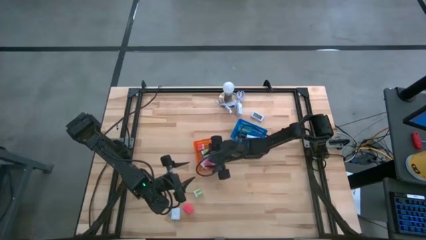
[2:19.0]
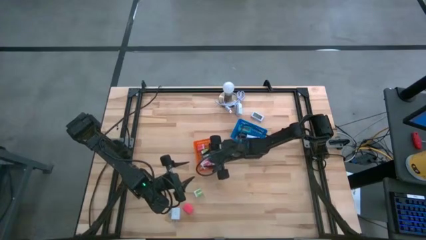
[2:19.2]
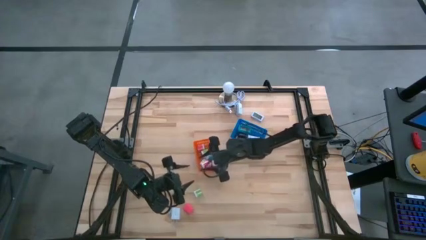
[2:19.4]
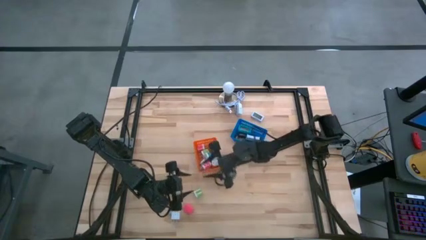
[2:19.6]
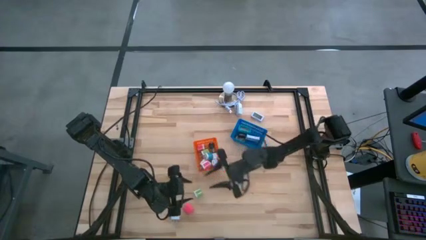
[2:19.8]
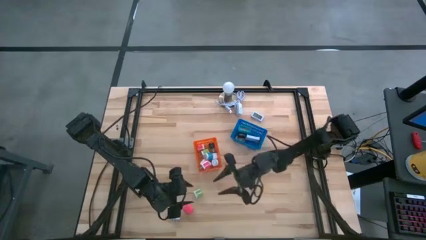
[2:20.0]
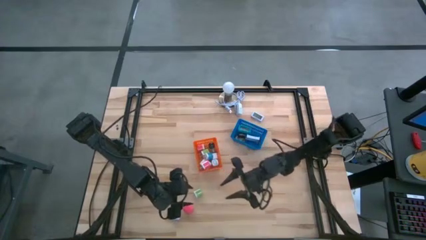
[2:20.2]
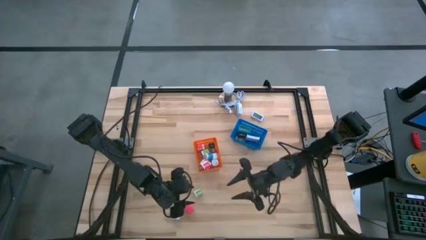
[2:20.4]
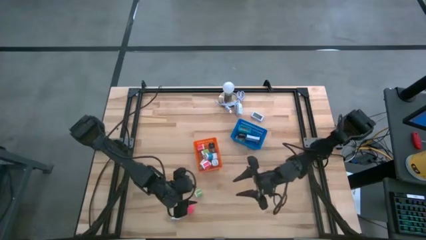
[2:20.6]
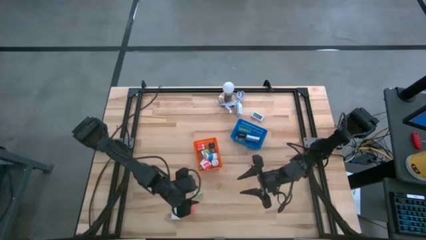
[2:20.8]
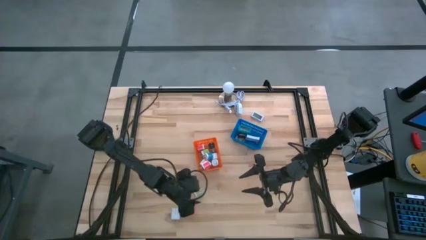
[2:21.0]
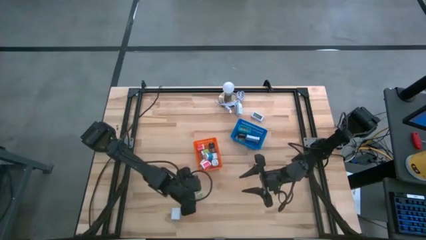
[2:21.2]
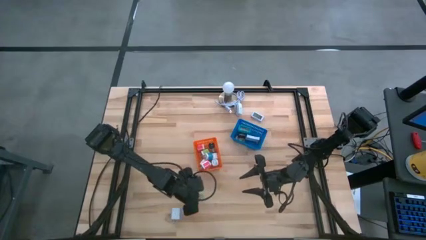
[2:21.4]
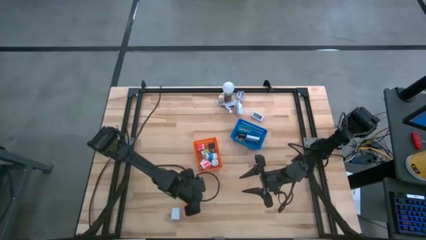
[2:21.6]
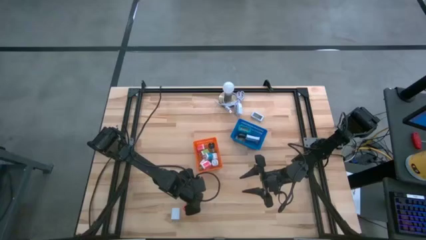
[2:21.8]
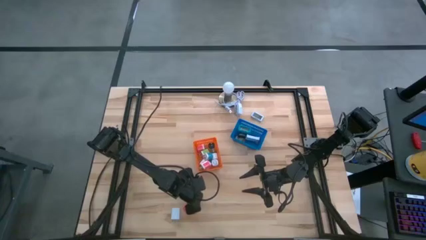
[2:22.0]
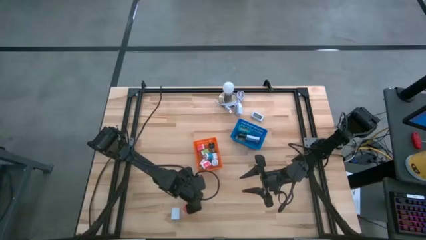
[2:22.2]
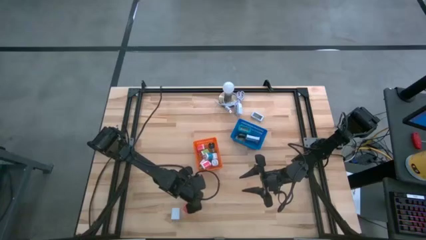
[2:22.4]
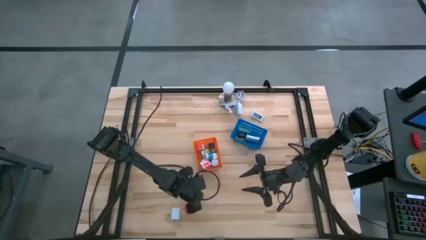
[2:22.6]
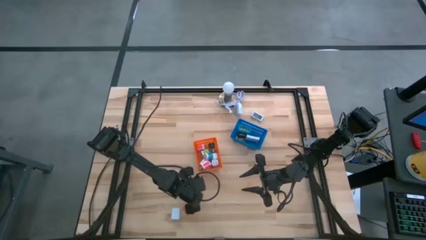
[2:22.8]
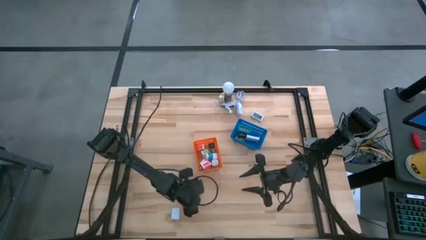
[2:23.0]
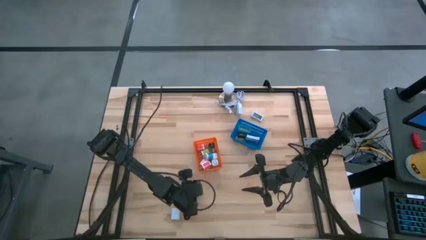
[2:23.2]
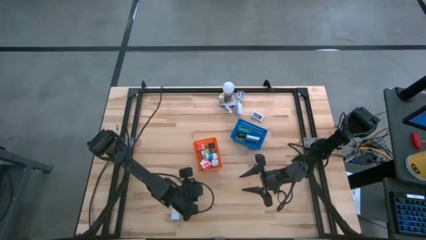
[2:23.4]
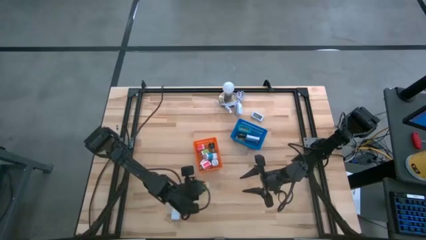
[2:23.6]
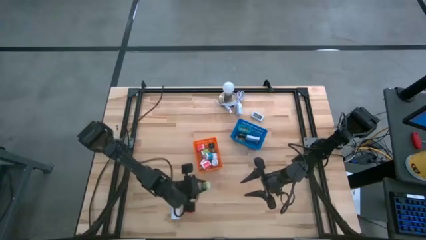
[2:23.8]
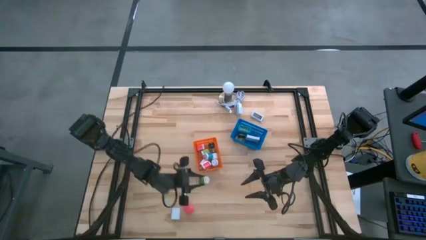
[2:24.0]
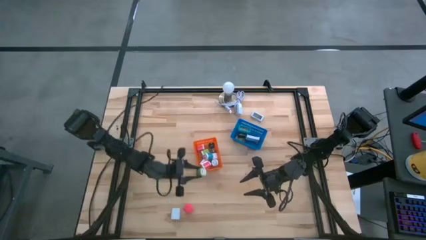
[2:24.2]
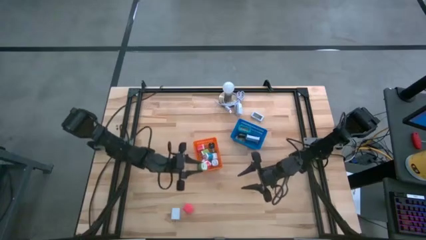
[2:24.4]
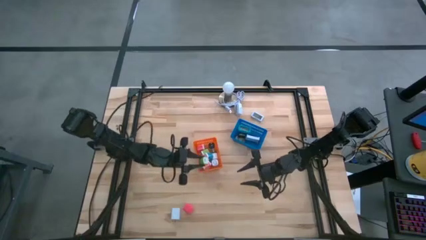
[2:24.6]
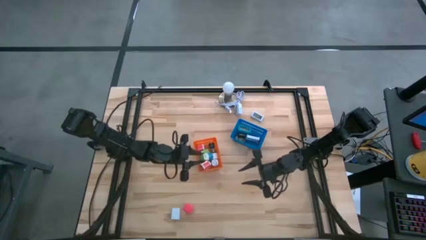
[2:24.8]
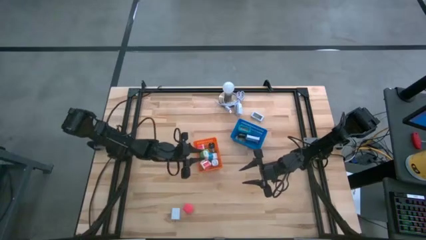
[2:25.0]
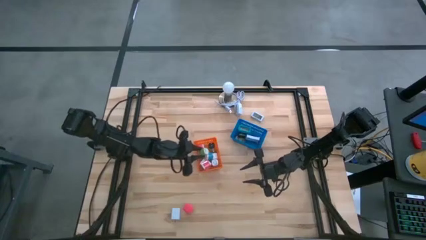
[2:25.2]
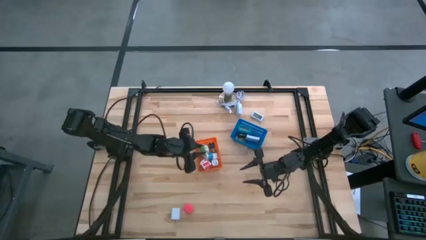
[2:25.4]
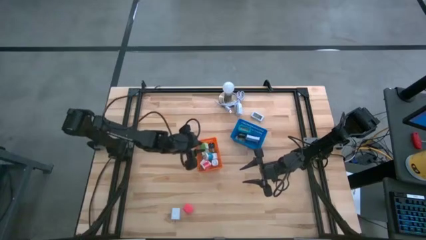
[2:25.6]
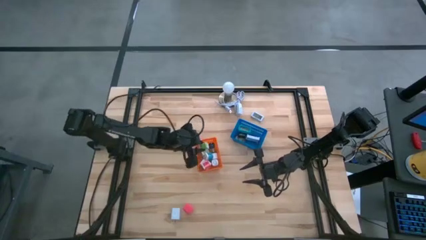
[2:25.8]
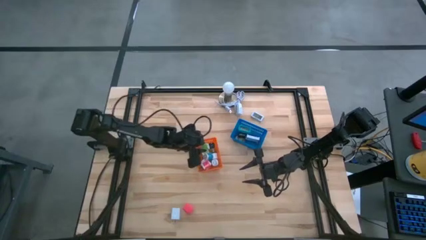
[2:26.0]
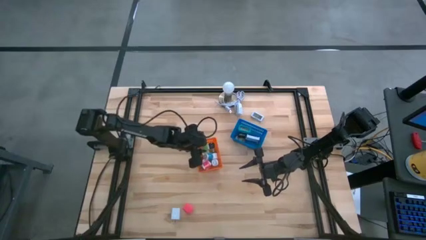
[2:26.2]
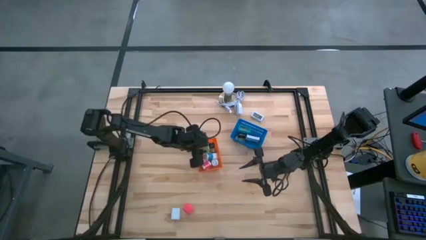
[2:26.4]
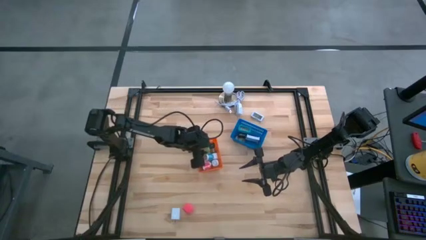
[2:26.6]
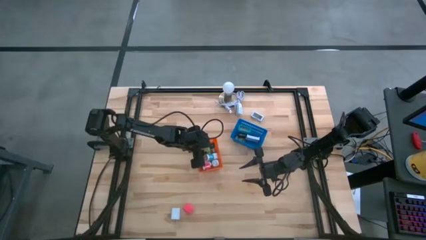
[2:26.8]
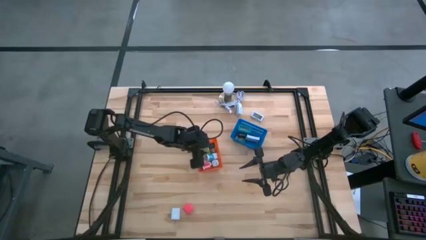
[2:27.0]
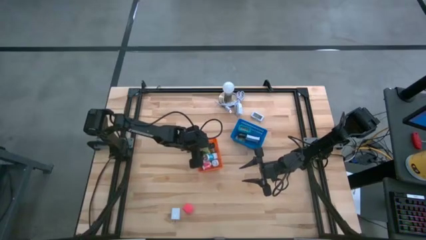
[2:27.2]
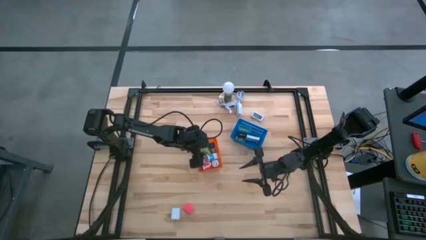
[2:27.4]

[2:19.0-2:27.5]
Task: Pick & Place Office items
Put the green charger adapter into the orange bin

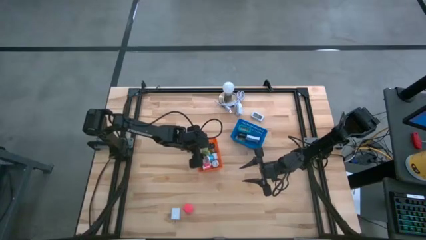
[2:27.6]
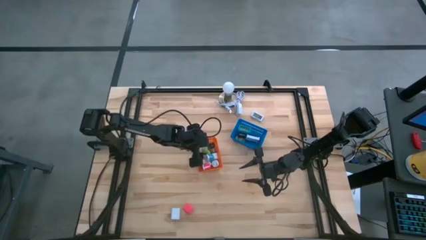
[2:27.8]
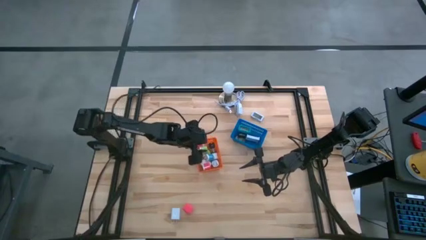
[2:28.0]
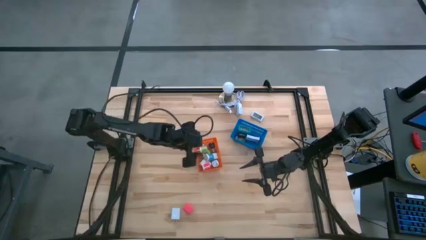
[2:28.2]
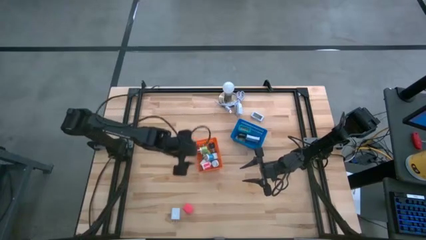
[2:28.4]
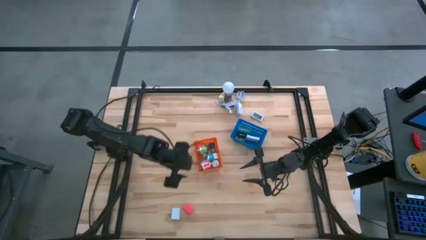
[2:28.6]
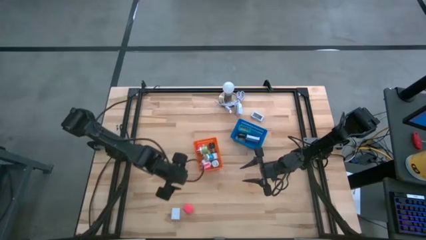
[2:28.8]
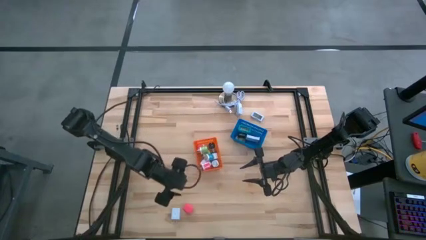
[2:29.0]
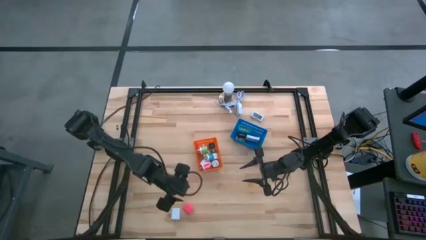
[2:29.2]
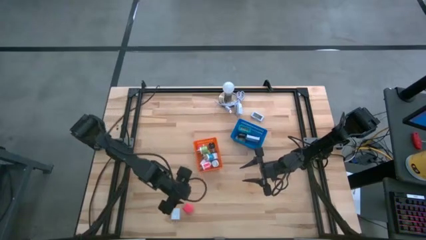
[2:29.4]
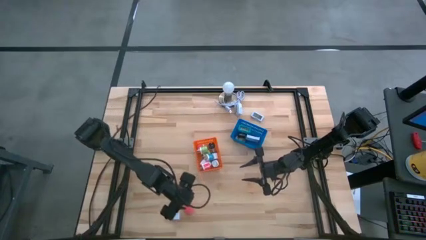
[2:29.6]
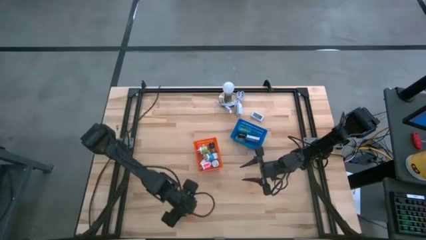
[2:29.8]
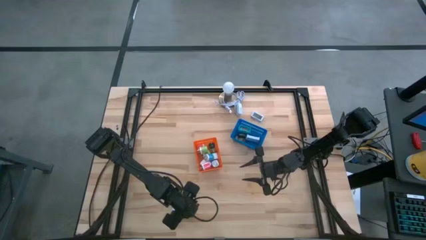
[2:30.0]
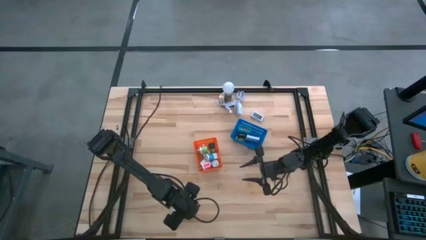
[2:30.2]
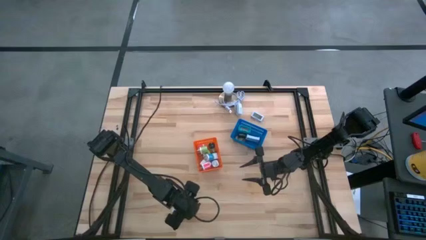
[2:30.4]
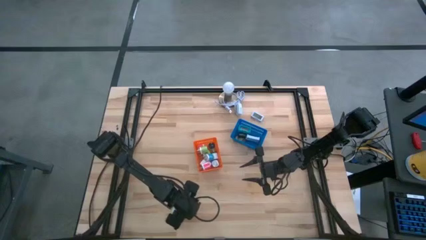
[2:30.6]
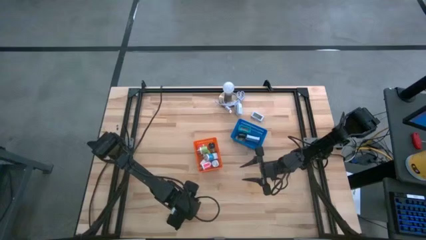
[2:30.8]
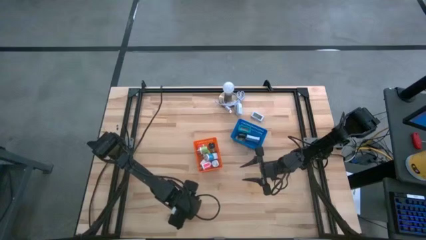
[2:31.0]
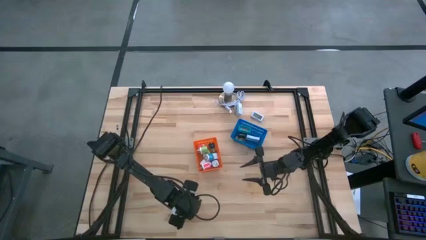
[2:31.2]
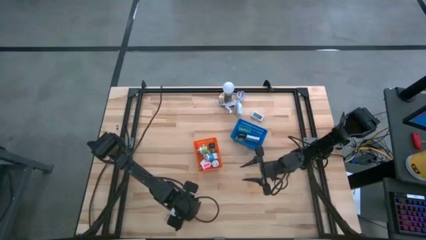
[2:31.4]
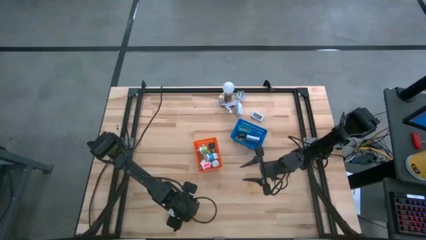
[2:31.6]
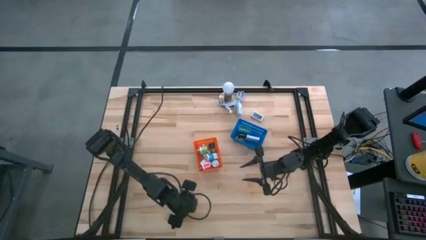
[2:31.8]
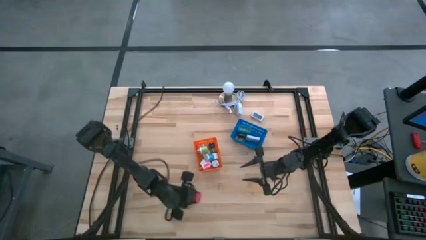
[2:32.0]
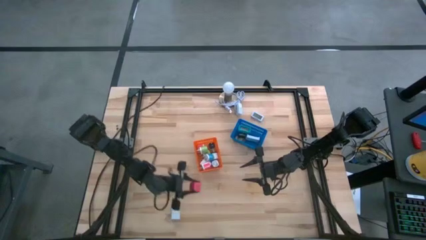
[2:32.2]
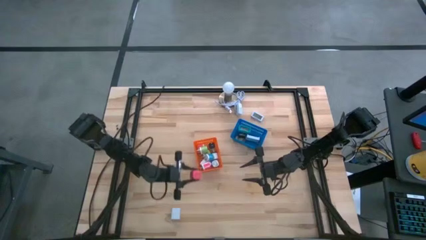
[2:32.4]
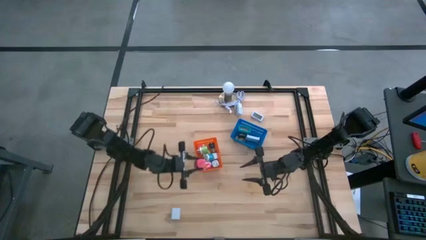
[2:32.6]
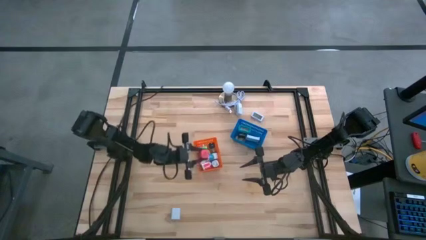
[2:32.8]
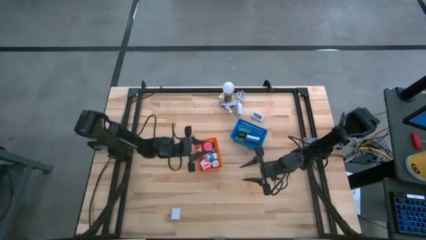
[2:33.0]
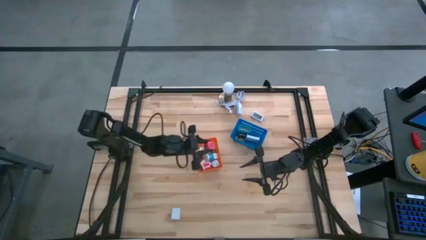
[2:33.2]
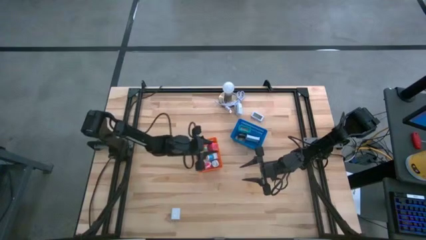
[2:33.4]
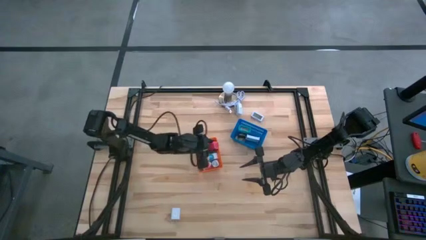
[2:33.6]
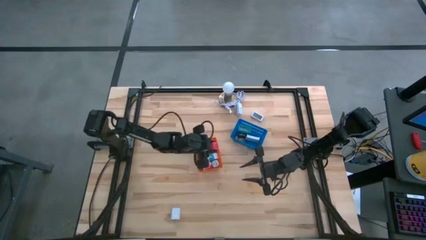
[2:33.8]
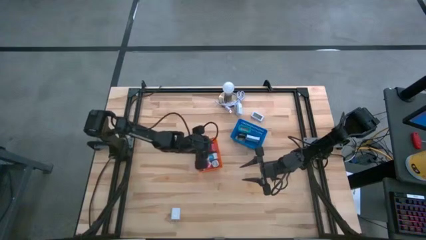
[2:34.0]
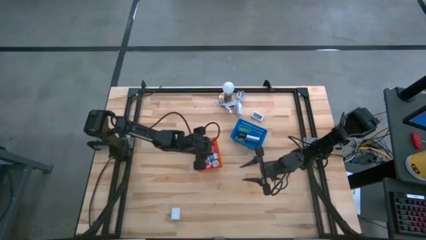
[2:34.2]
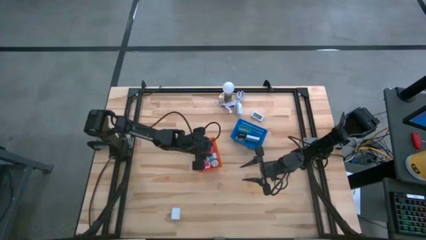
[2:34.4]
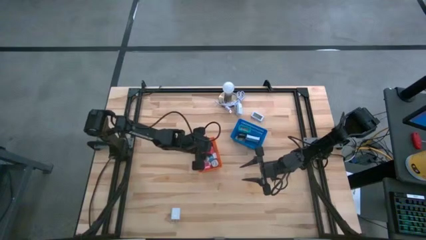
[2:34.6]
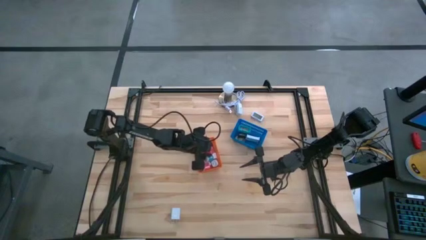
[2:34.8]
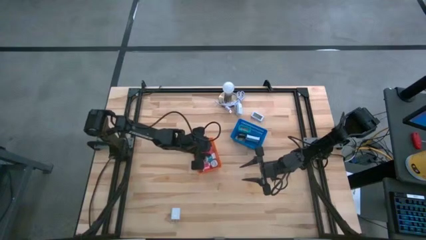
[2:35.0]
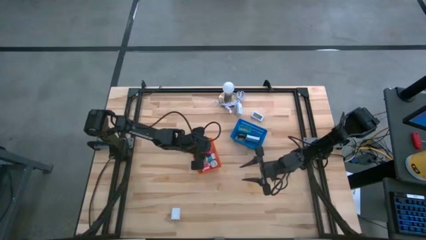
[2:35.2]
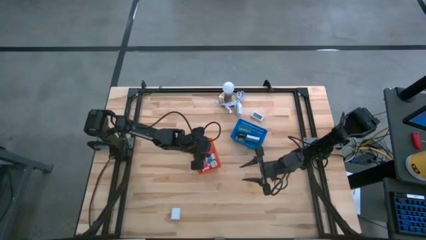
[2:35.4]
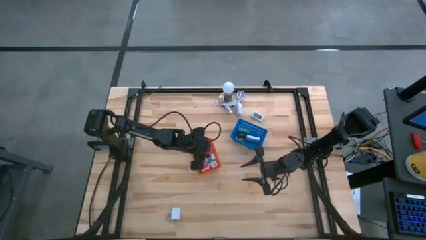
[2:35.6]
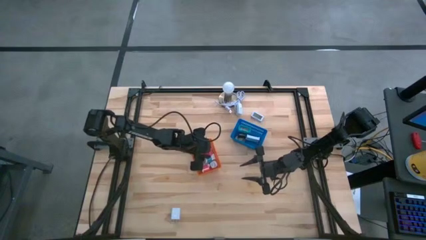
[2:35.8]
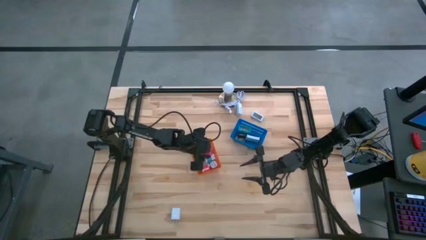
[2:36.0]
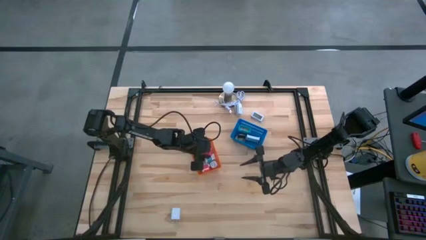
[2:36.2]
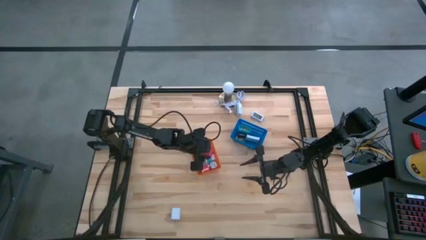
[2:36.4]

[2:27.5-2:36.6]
Put the pink charger adapter into the orange bin
